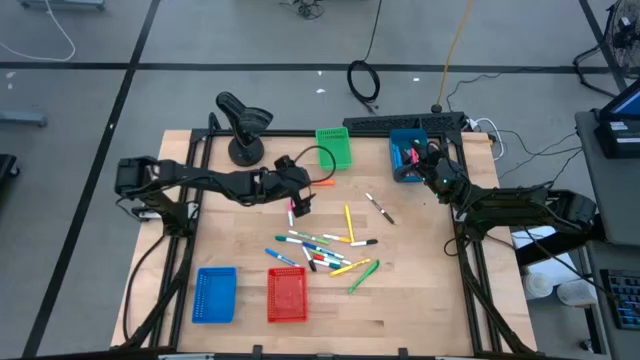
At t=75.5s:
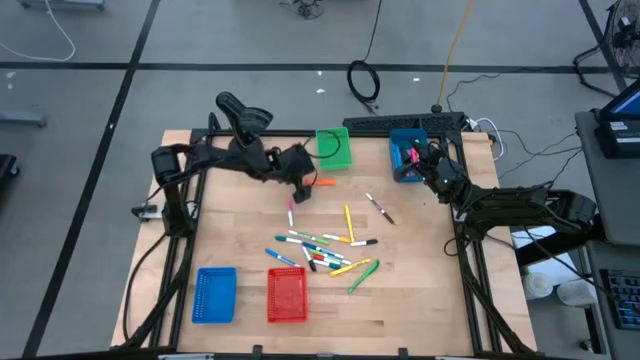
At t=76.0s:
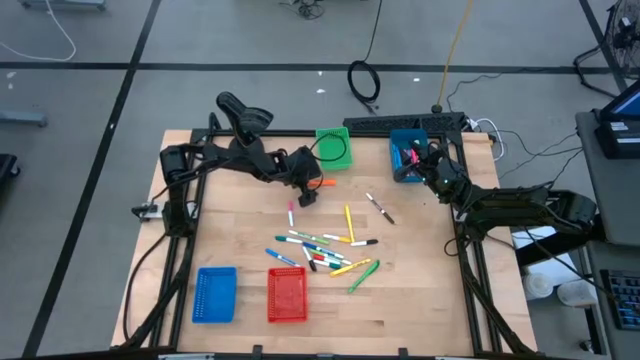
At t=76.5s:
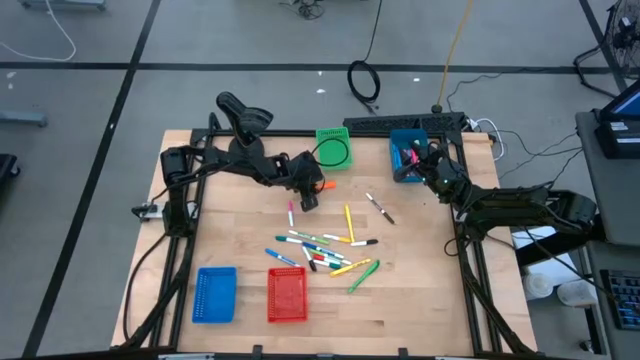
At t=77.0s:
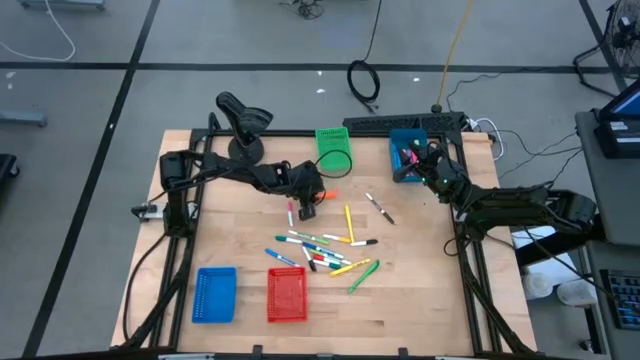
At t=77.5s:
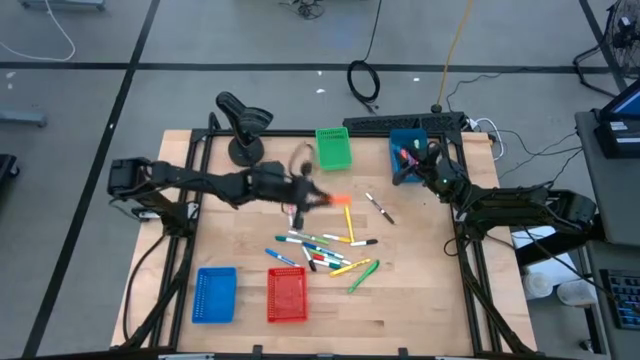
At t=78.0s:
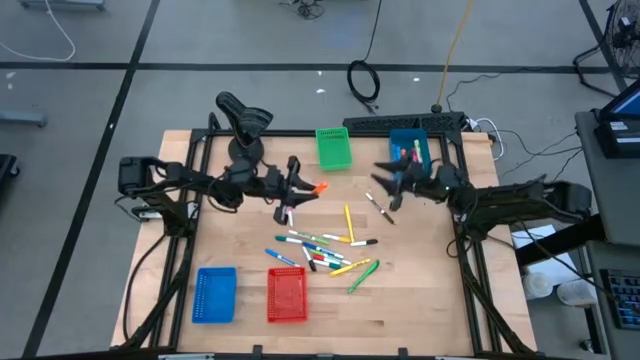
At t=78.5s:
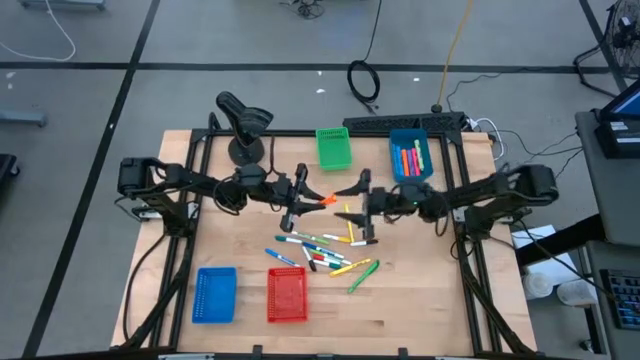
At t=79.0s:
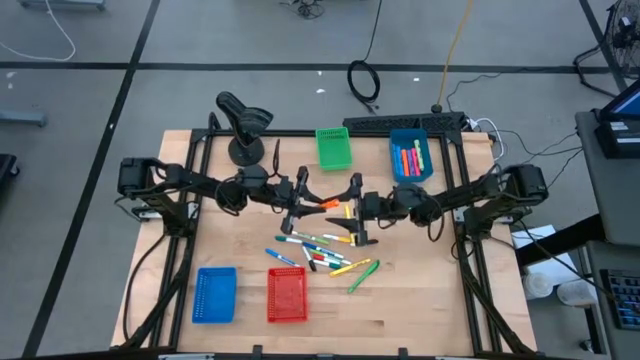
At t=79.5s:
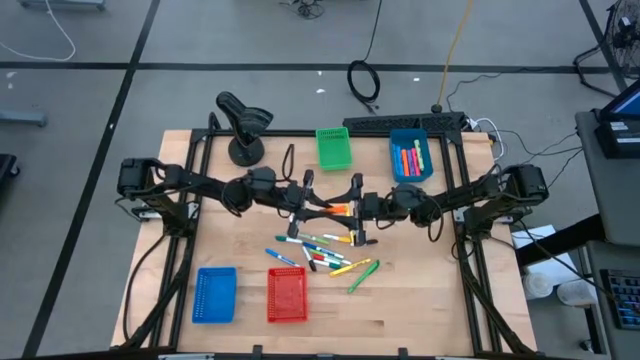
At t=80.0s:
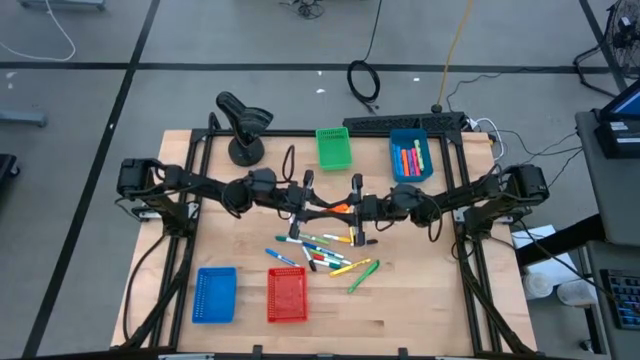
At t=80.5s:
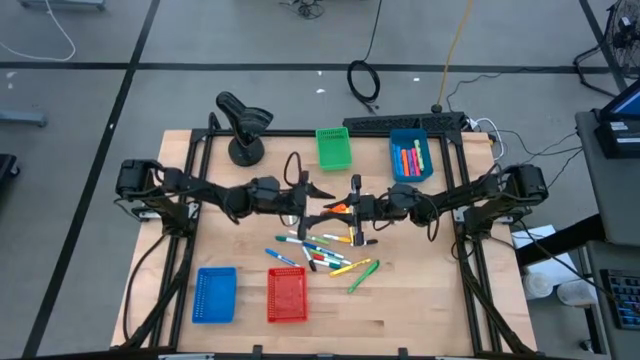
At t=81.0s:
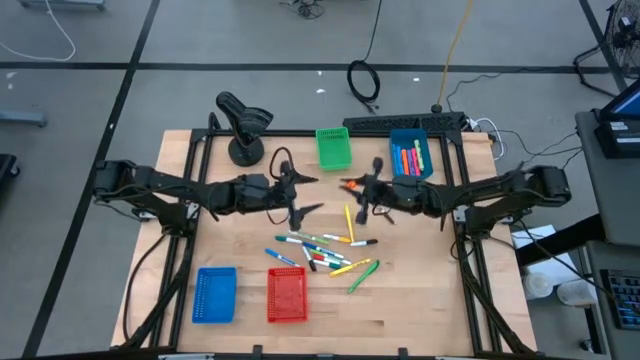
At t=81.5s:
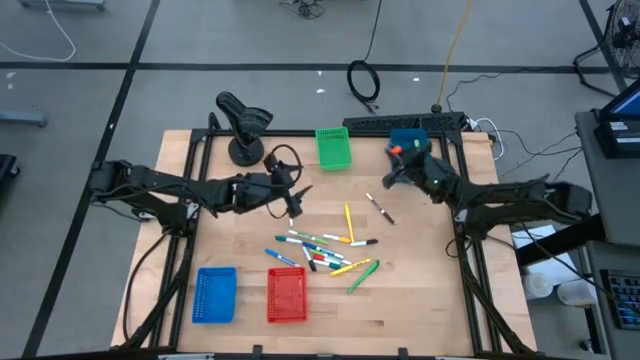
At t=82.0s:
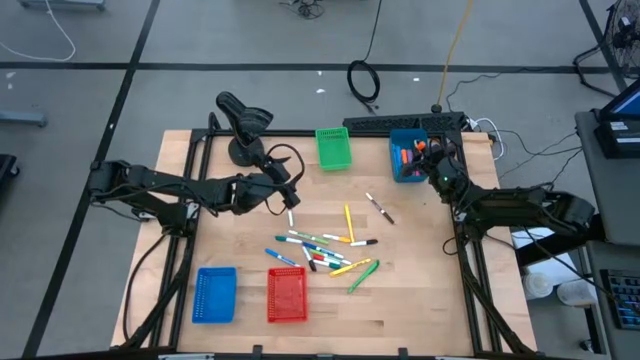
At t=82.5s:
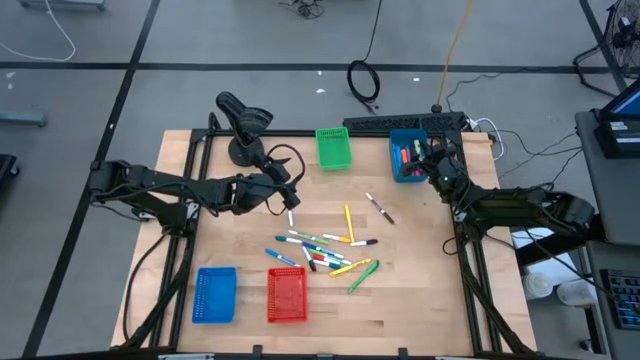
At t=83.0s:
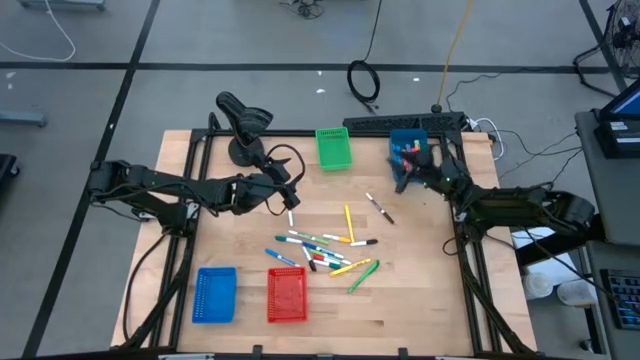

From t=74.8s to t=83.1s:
Task: Pick & Place Markers
Put the orange highlighter into the dark blue bin

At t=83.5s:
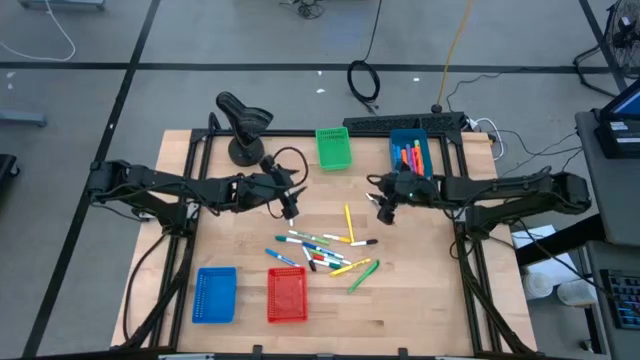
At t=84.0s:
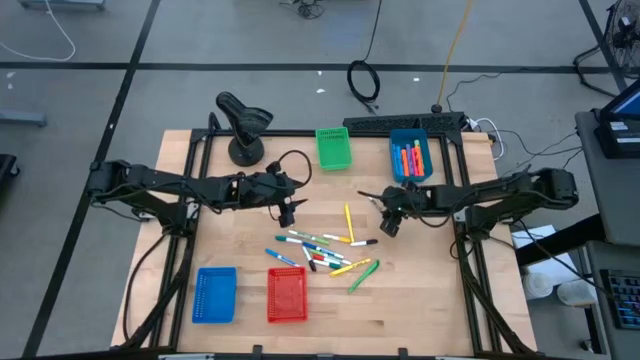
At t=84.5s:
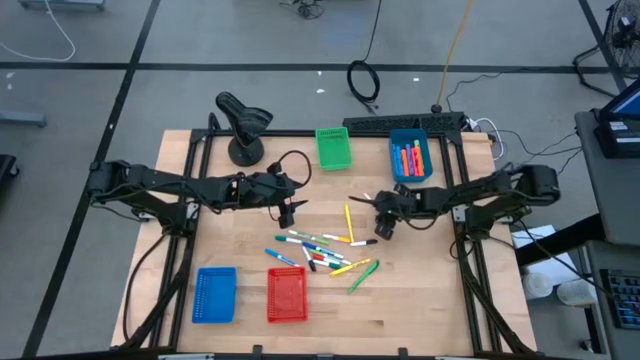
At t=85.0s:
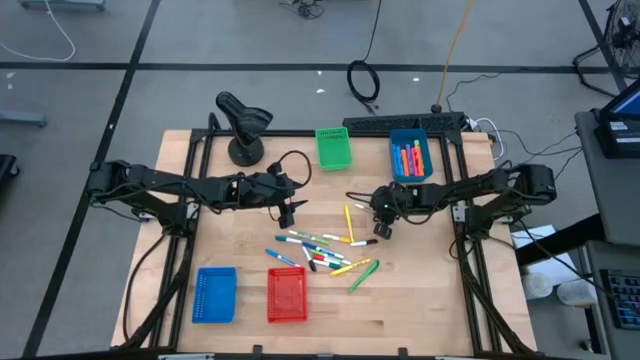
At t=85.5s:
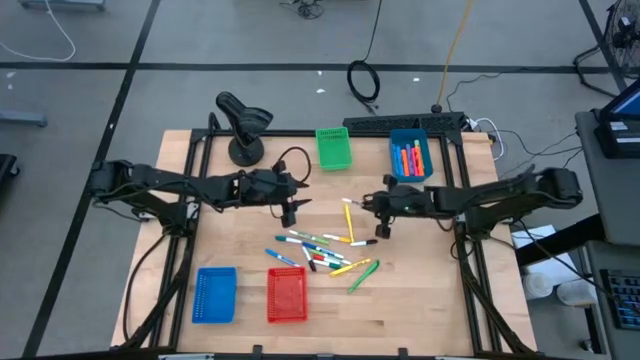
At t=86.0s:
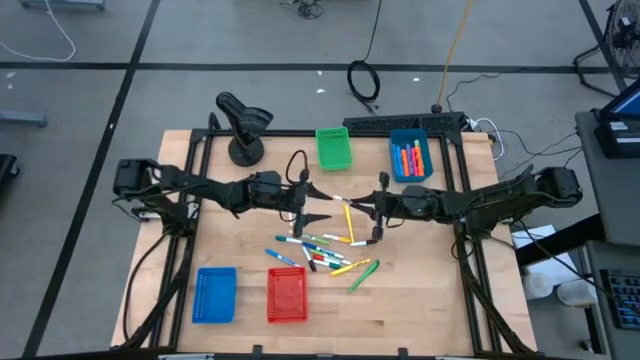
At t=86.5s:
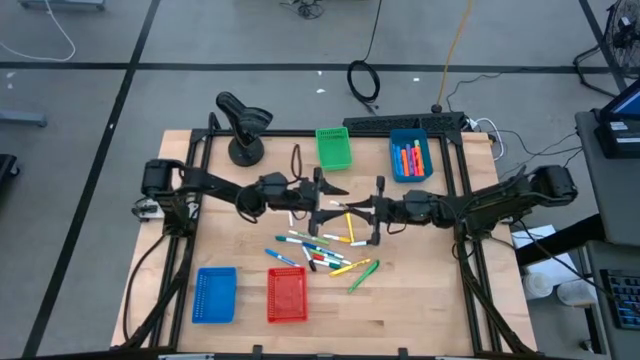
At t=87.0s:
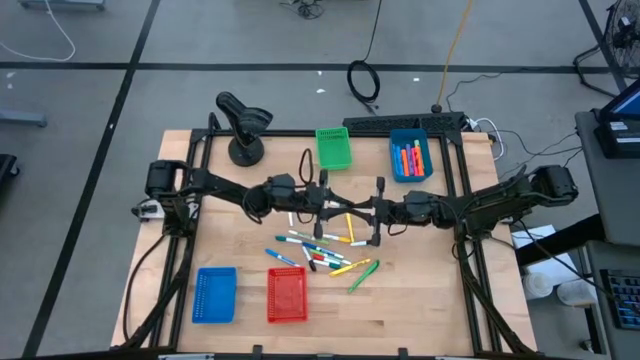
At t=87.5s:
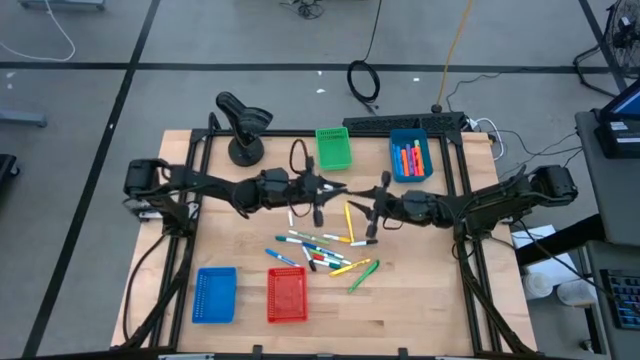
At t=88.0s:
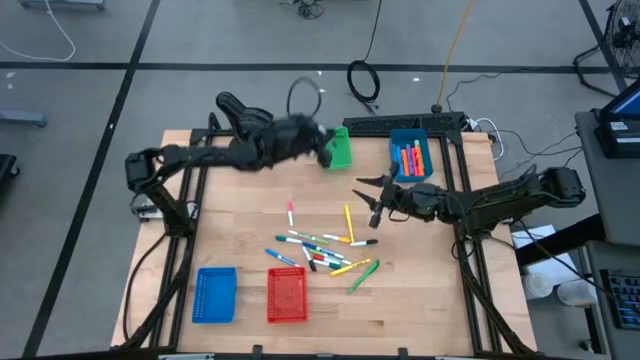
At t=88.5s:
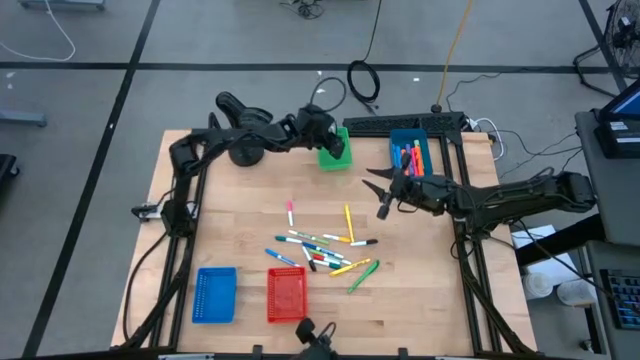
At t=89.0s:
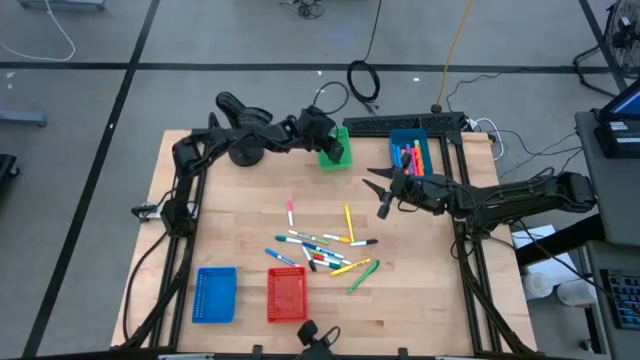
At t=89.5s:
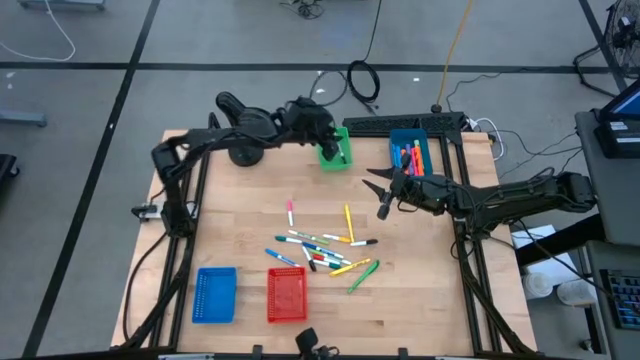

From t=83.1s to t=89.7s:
Put the brown thin dry erase marker into the green bin

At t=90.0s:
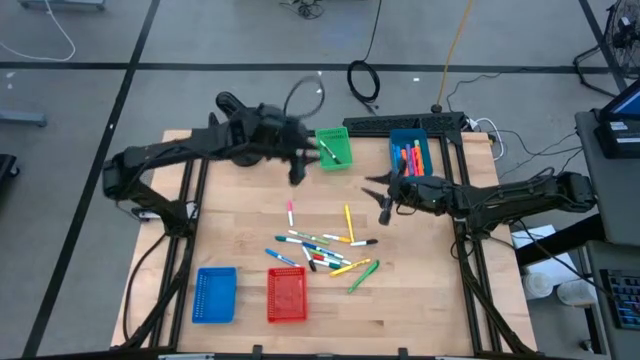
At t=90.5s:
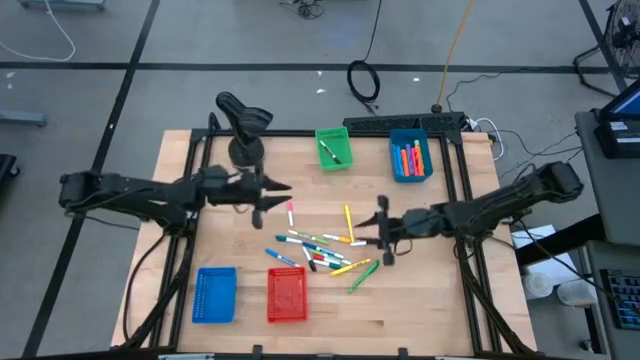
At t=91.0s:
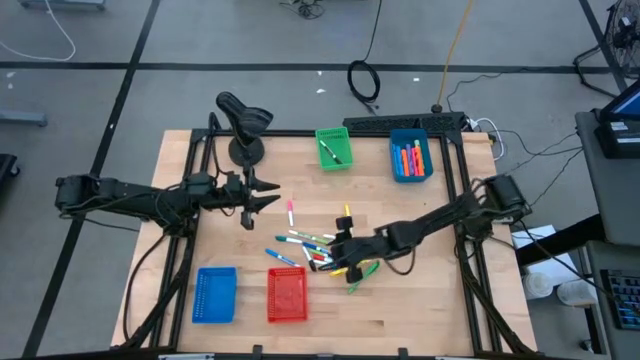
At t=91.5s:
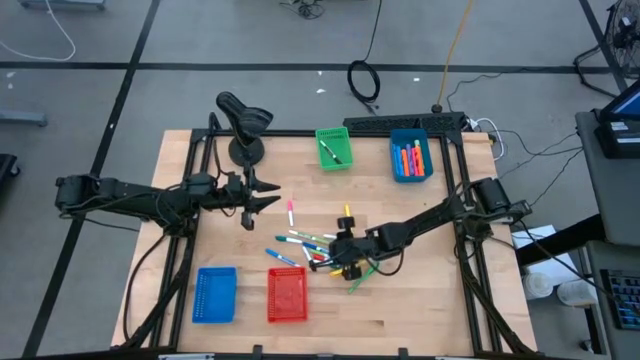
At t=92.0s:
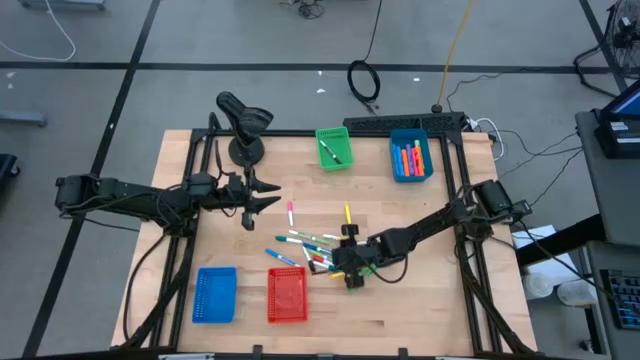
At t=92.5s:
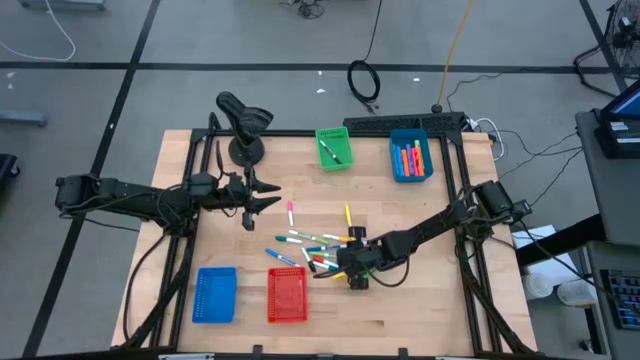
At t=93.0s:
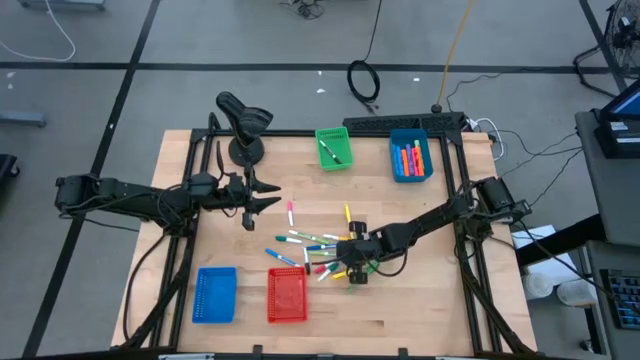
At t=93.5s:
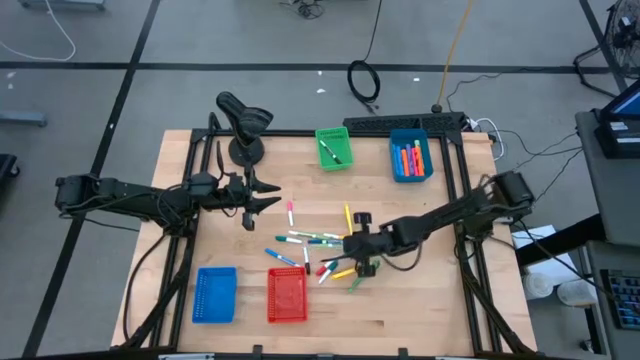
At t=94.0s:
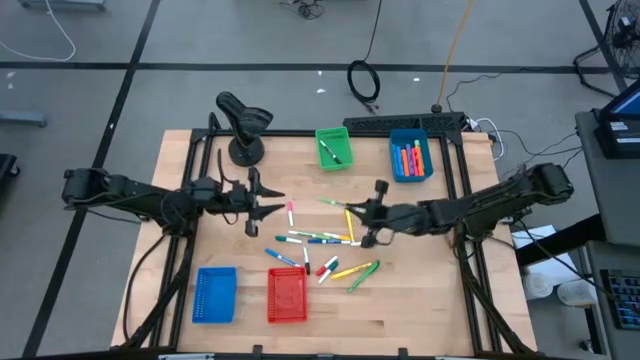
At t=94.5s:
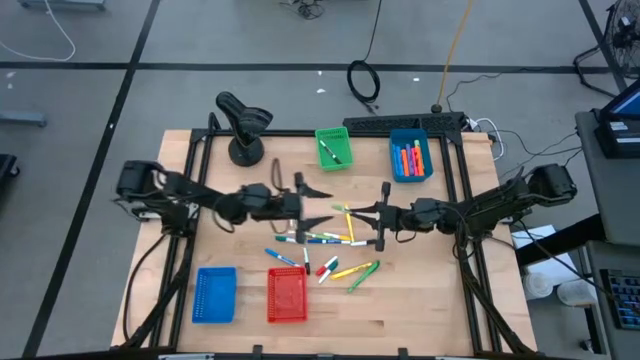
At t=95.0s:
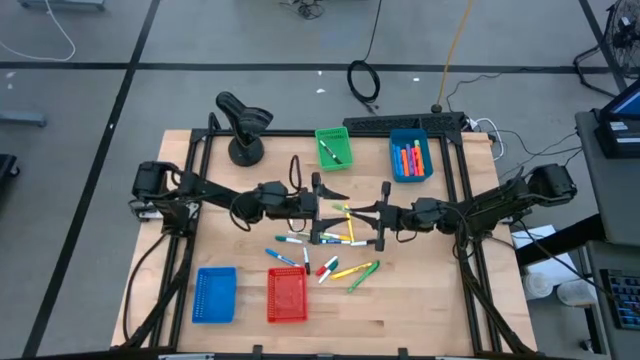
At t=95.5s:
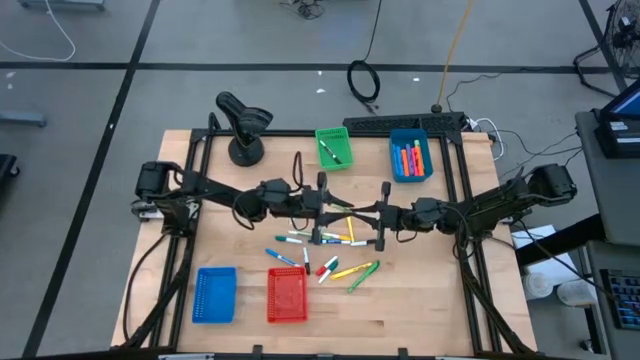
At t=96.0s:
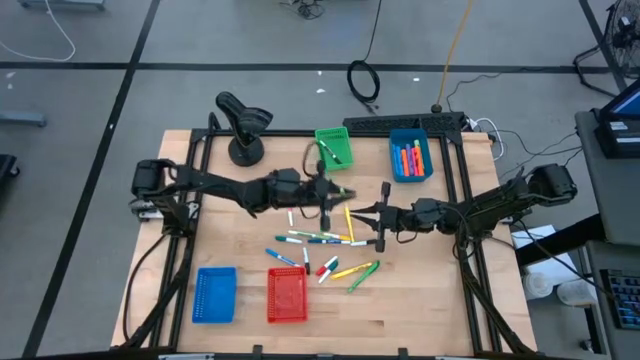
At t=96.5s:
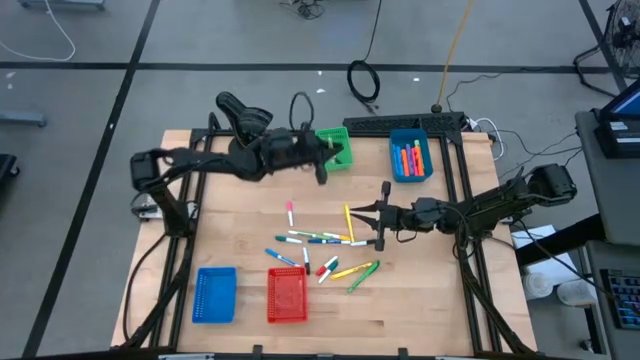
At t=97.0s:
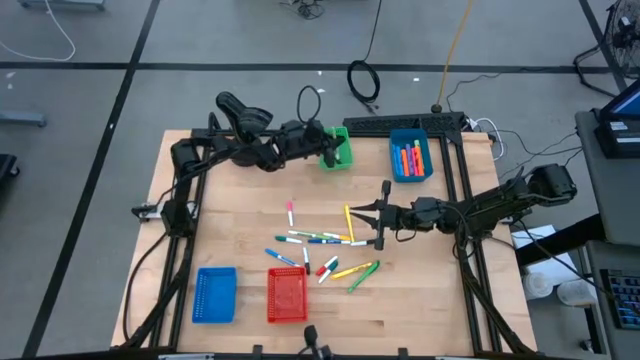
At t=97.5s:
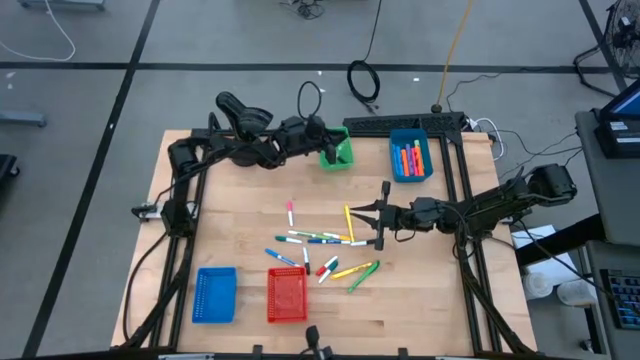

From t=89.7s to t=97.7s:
Put the bottom green thin dry erase marker into the green bin
